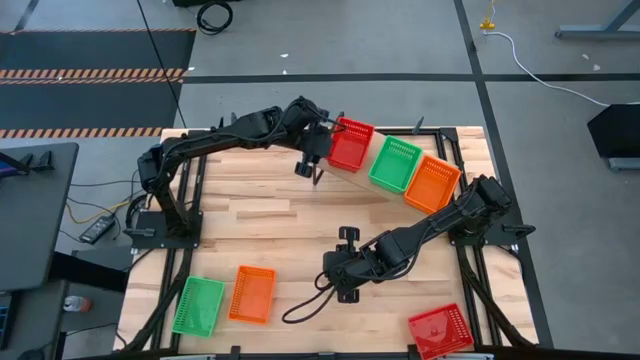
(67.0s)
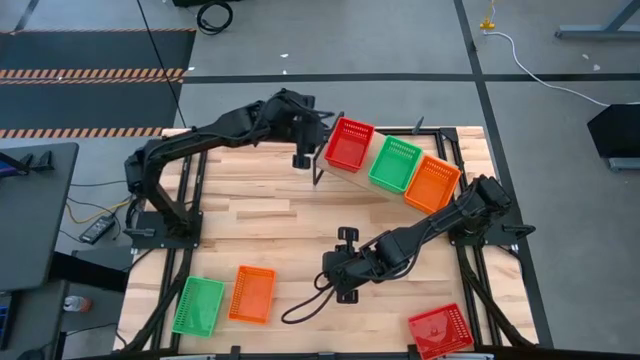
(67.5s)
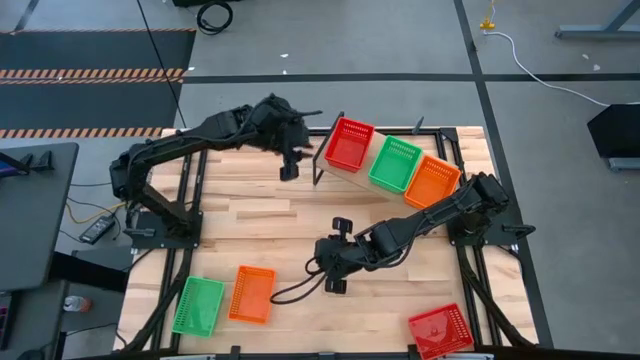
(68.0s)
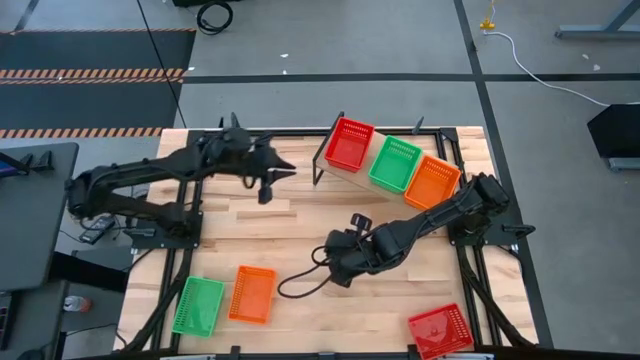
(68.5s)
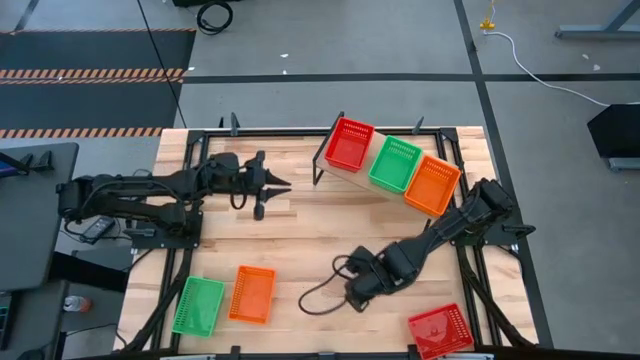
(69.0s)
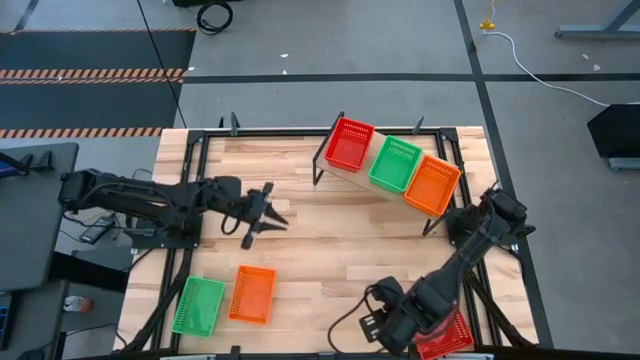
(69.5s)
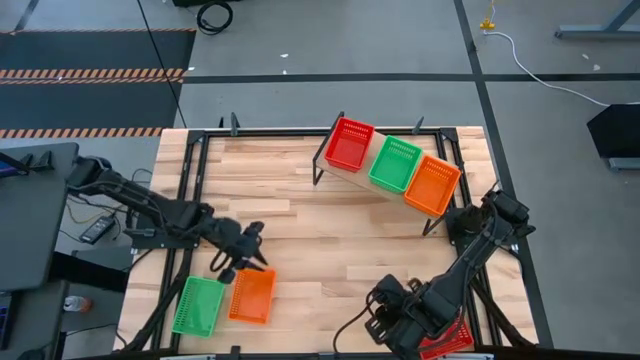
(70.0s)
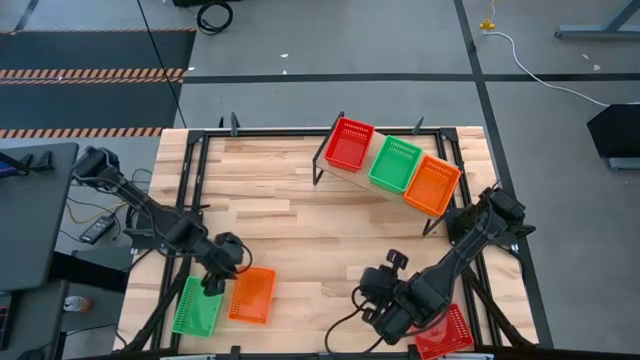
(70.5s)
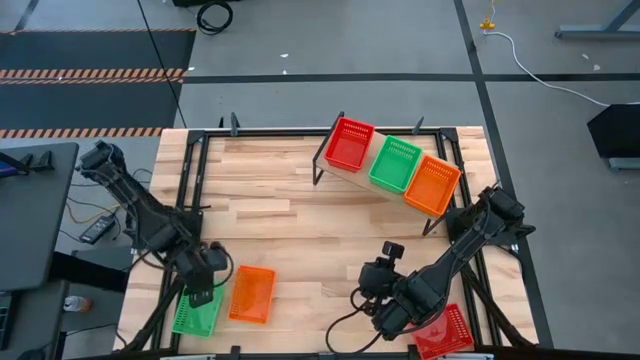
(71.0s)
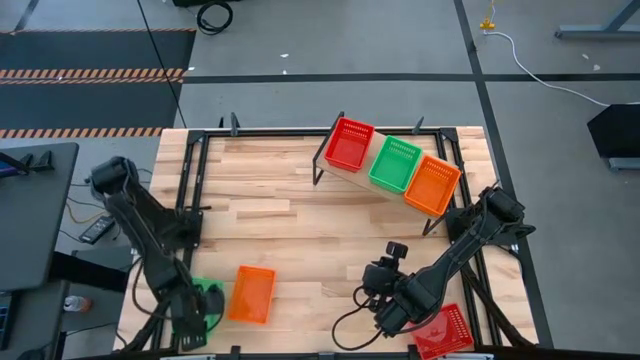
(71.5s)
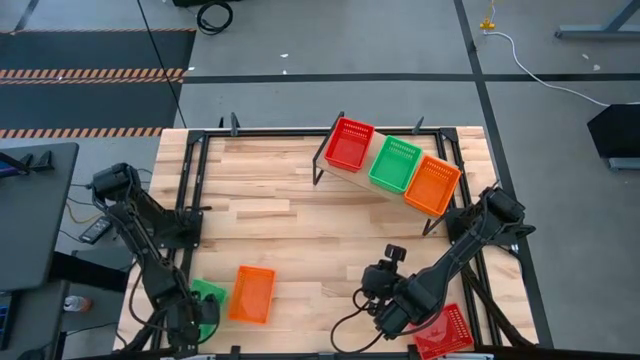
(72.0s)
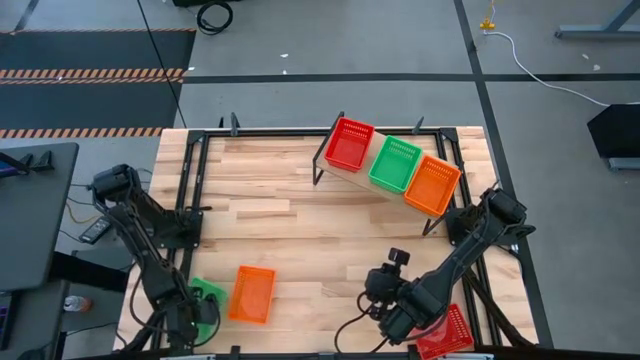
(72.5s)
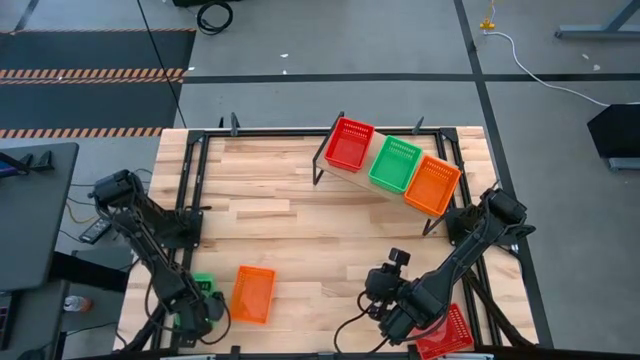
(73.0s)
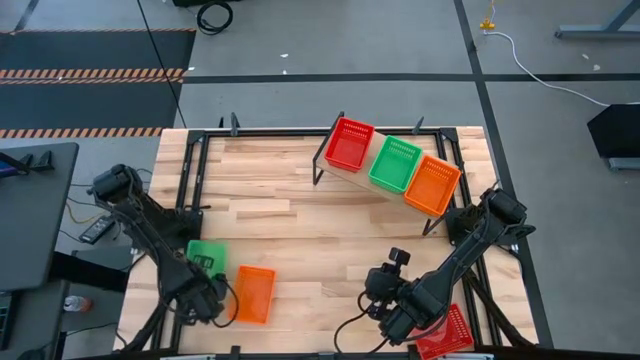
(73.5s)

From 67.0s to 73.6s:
Task: Stack baskets on shelf by color
Stack the green bin on the stacked green bins on the shelf

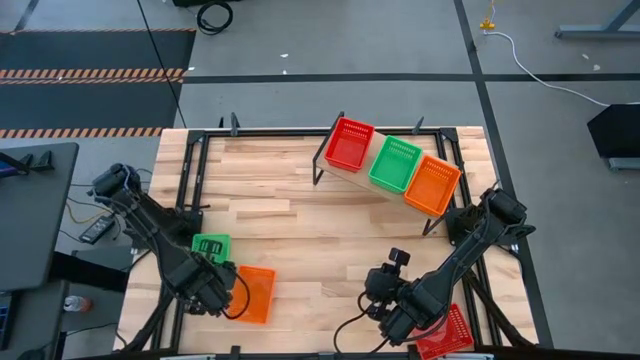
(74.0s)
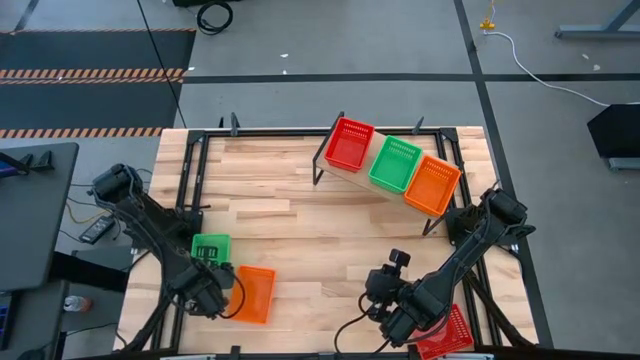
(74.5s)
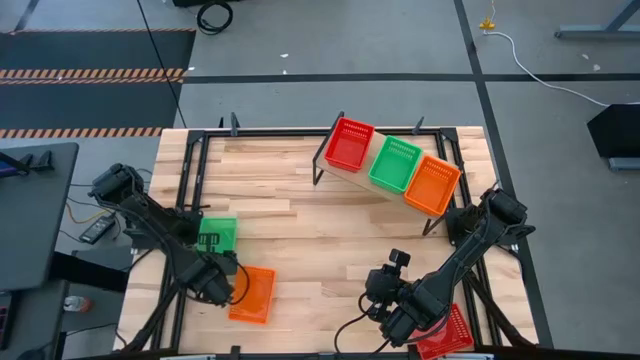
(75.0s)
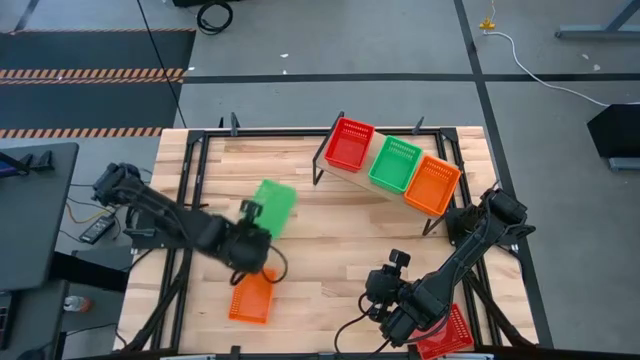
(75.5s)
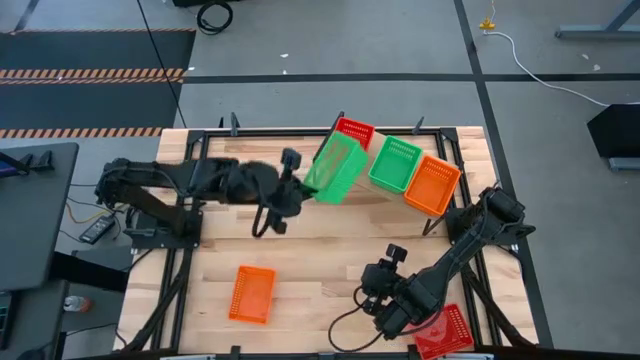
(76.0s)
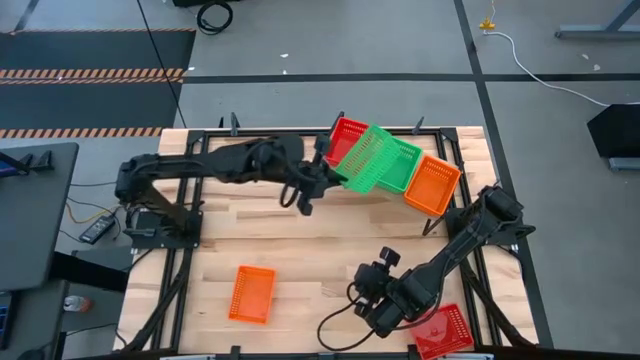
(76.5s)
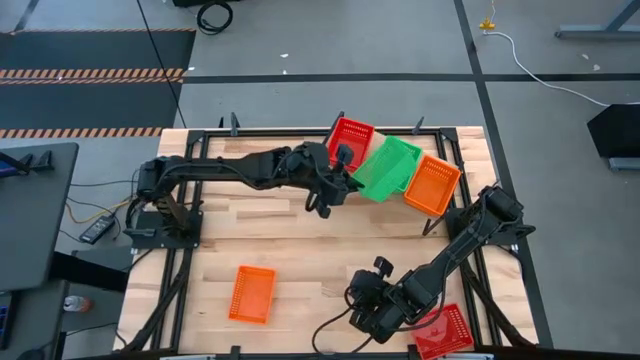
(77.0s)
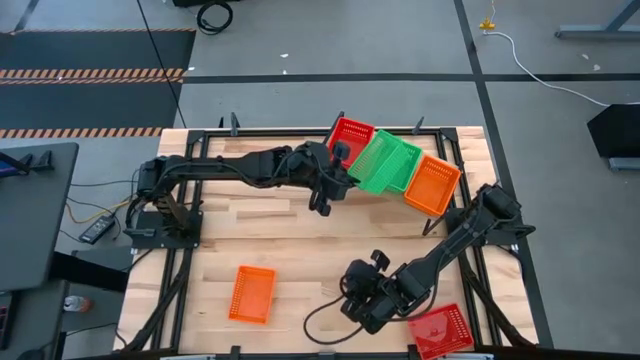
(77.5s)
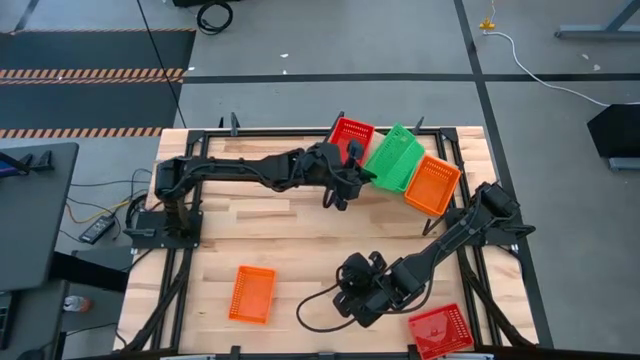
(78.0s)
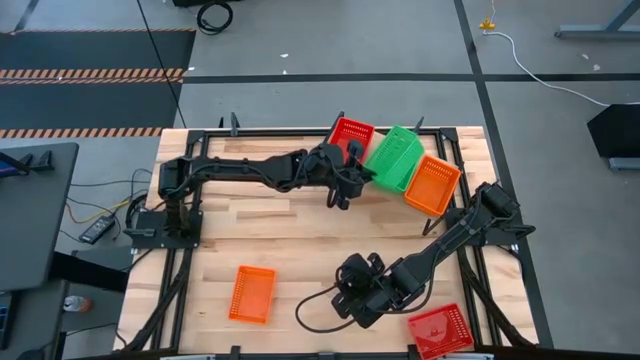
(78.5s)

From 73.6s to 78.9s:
Stack the green bin on the stacked green bins on the shelf

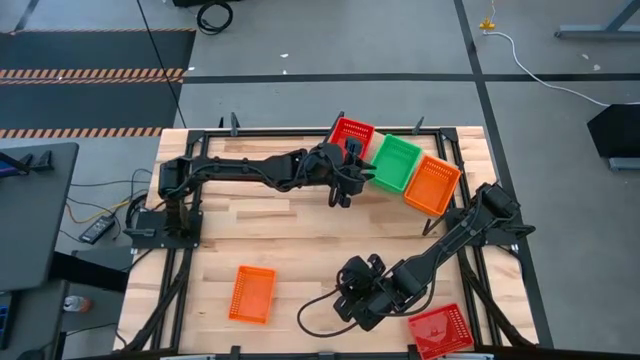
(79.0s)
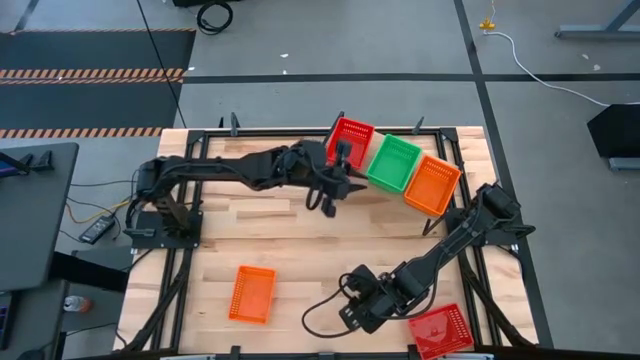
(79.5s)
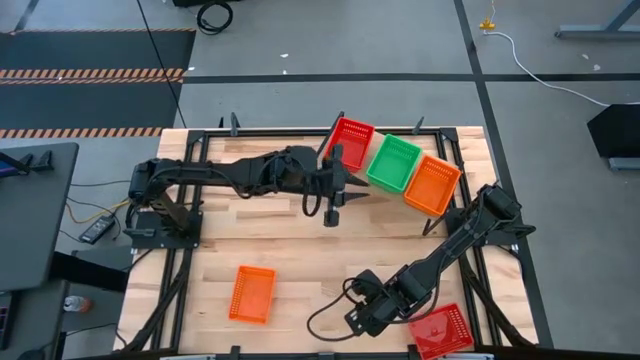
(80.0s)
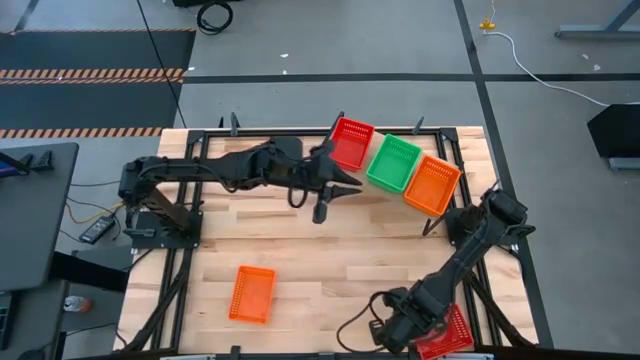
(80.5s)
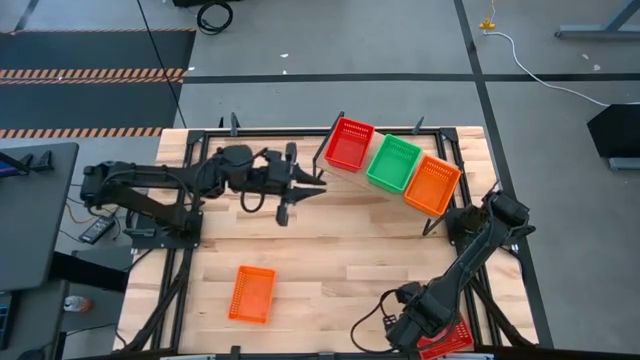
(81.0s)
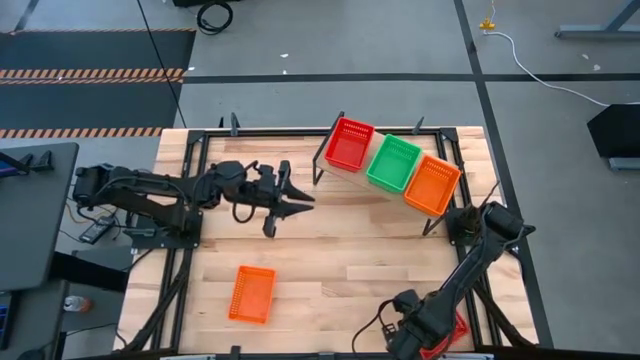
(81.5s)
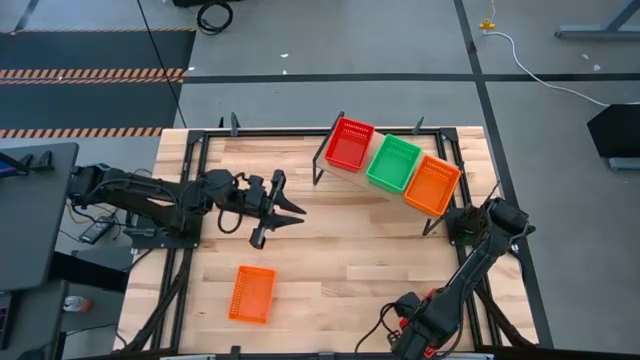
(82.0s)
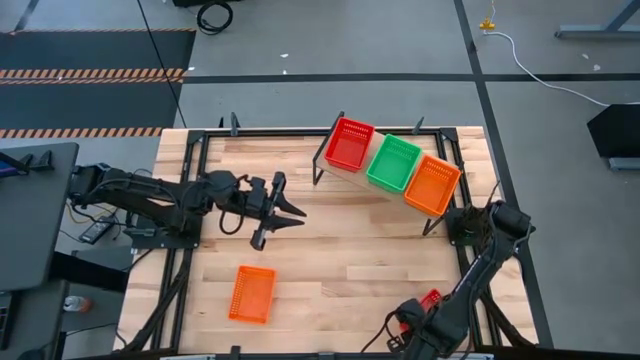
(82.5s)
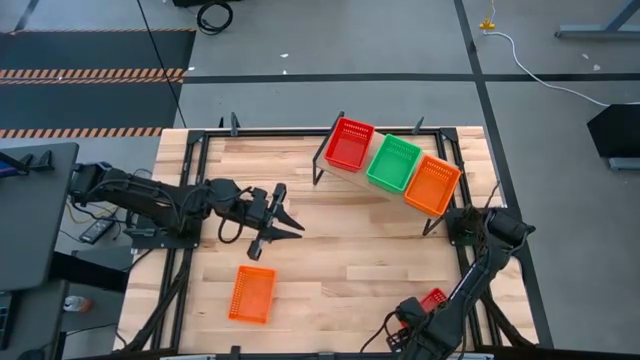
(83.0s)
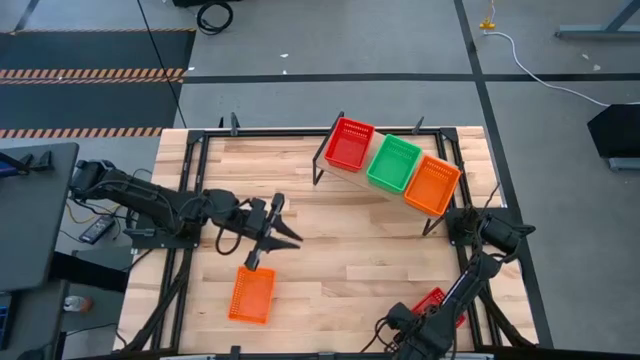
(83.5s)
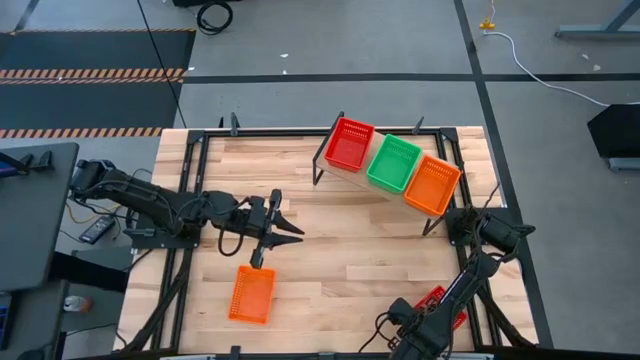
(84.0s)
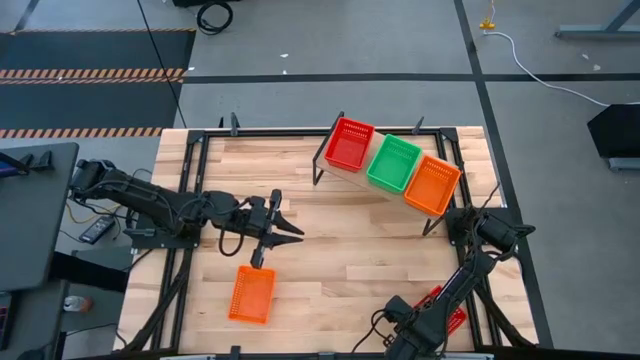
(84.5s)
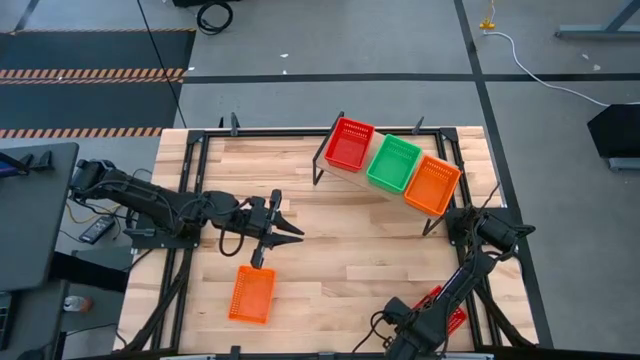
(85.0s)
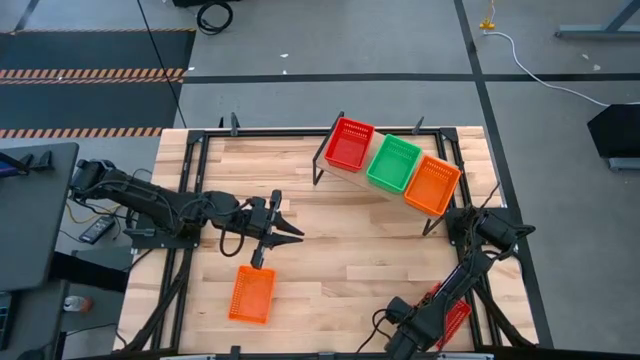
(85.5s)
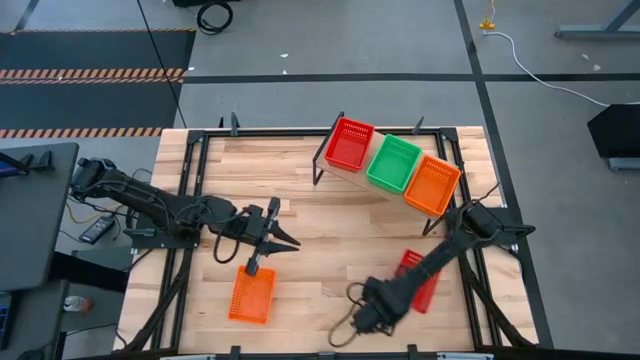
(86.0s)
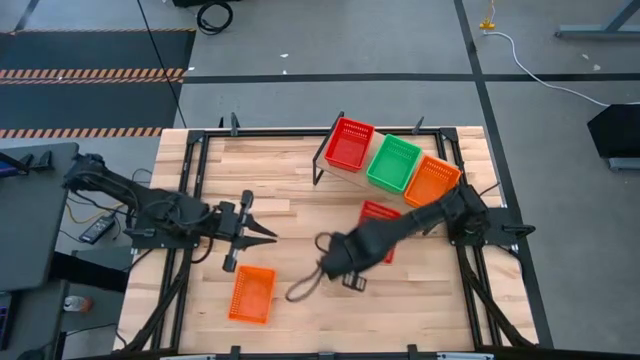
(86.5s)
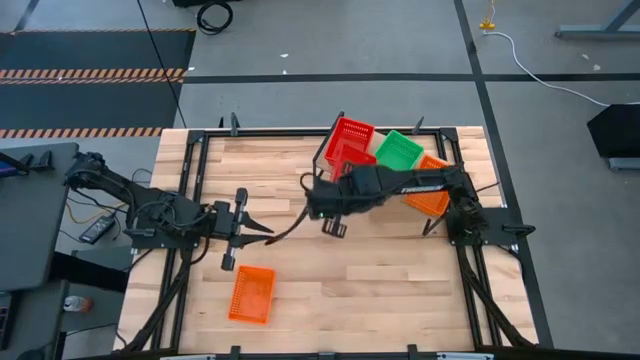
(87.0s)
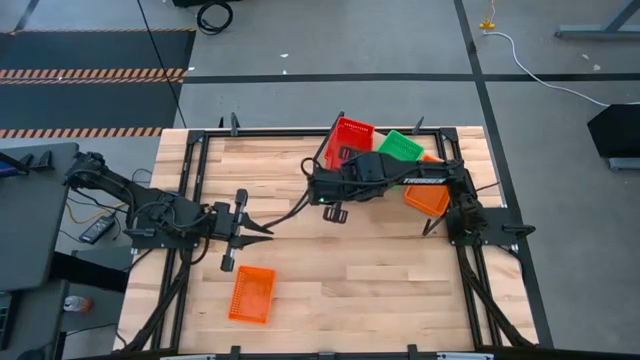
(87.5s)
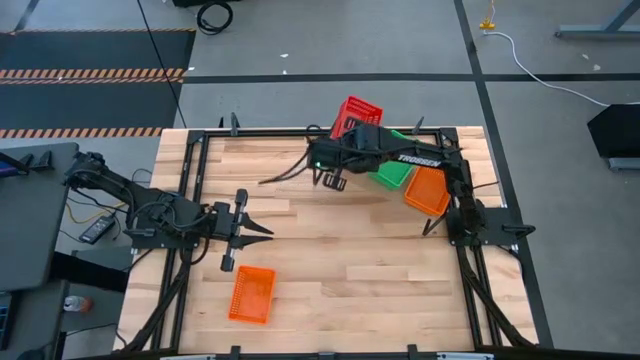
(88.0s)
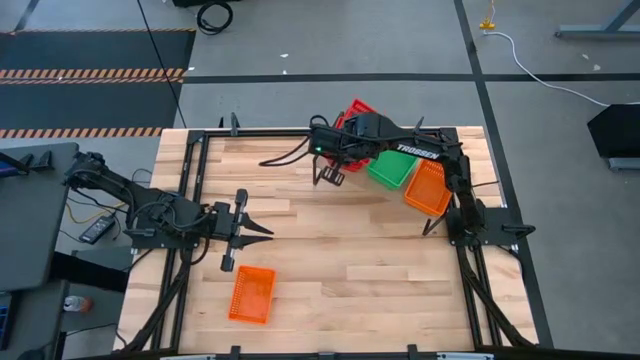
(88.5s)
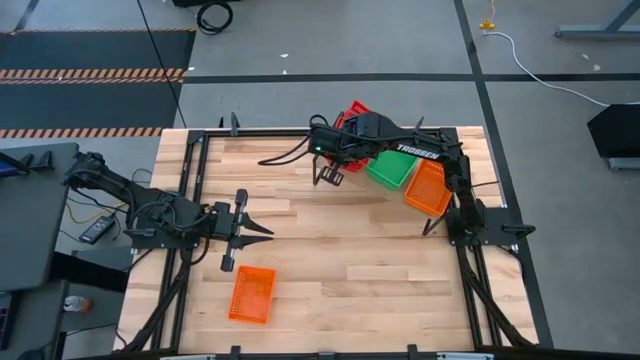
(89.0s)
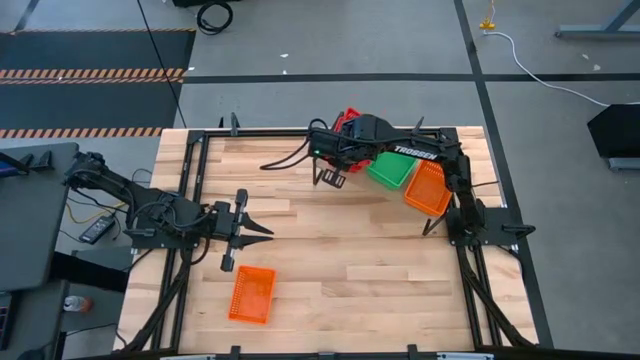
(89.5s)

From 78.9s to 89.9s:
Stack the red bin on the stacked red bins on the shelf
